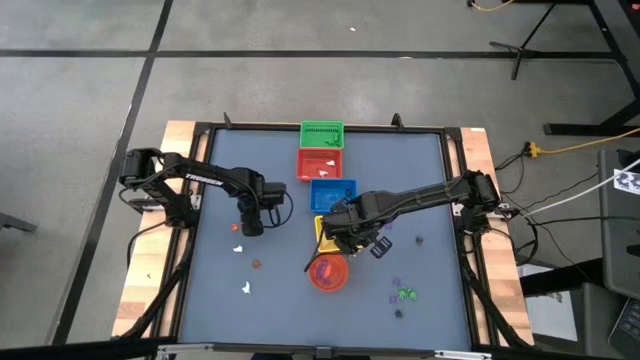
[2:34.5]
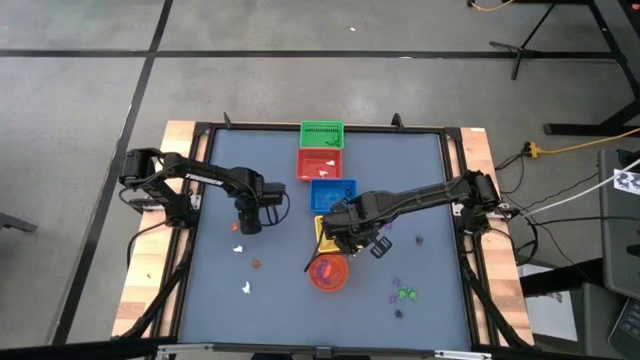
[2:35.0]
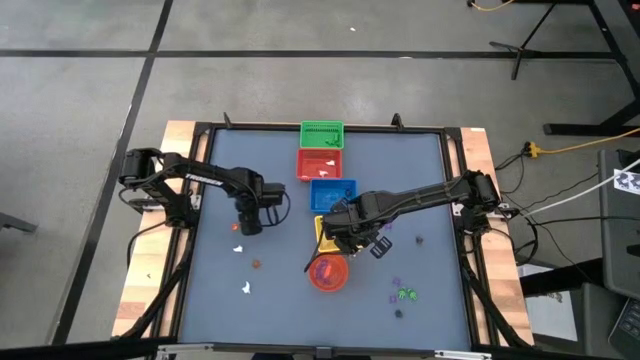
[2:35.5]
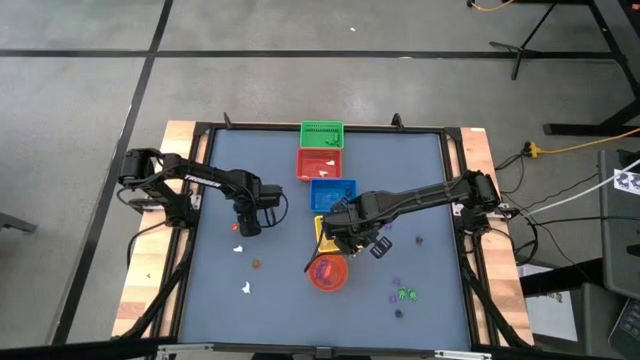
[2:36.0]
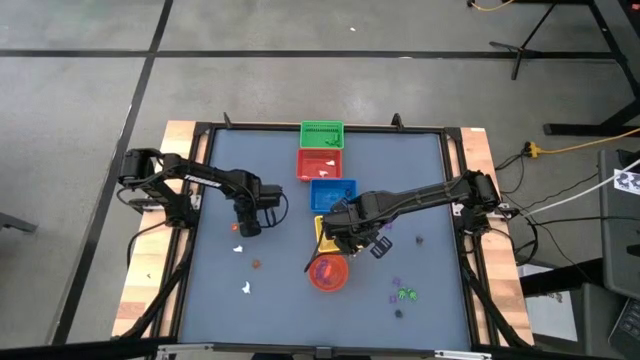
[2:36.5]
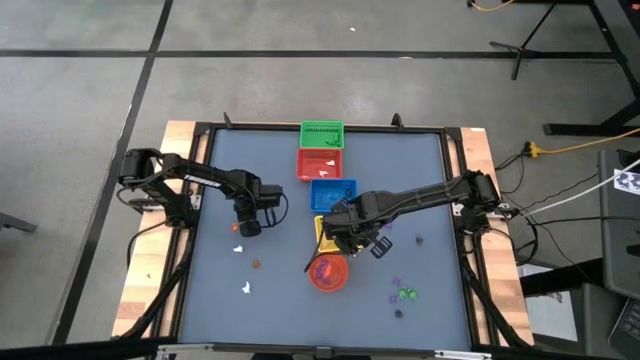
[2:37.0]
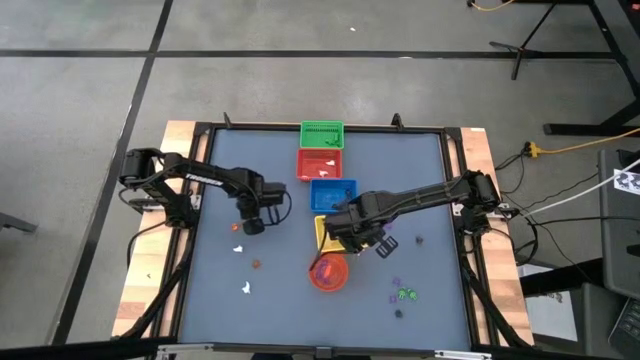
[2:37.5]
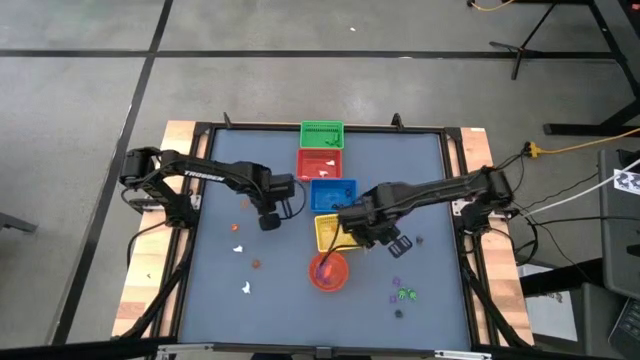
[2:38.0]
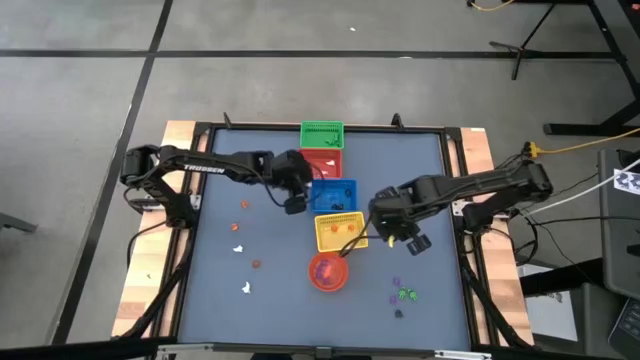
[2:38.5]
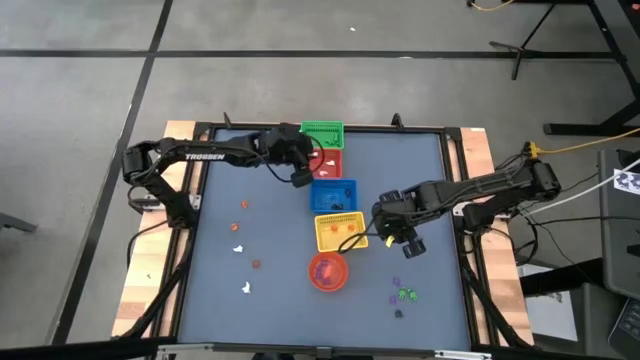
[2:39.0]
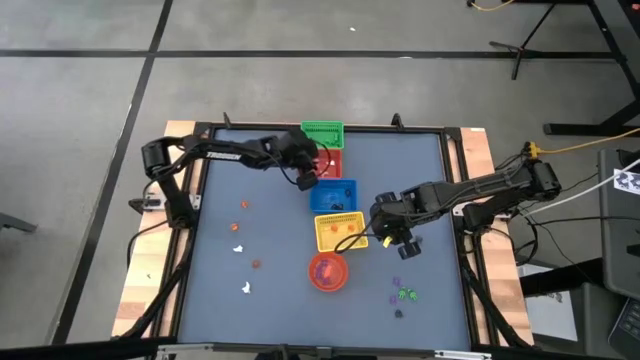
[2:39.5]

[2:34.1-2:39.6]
Task: Sort Halloween decoration
Put the white ghost toy into the red bin

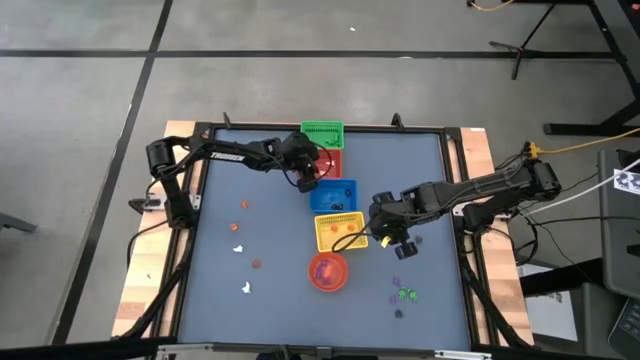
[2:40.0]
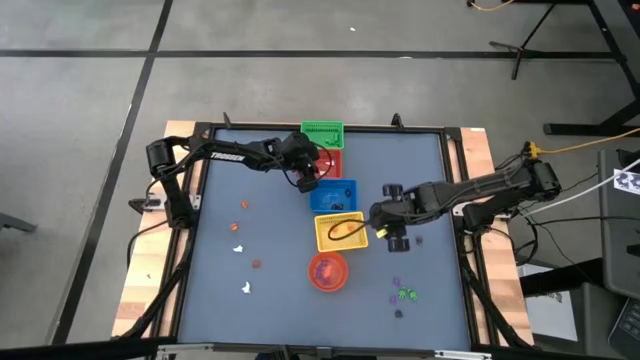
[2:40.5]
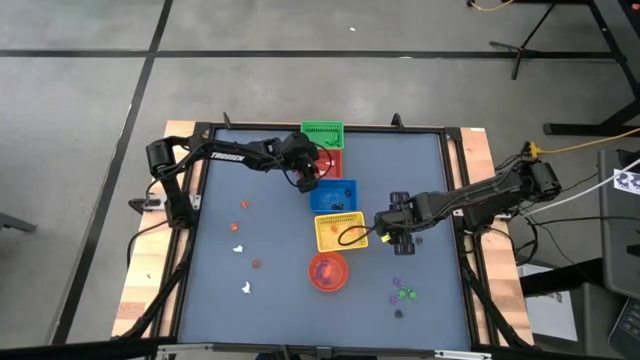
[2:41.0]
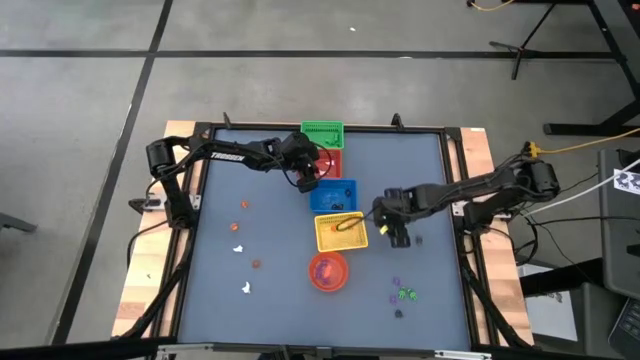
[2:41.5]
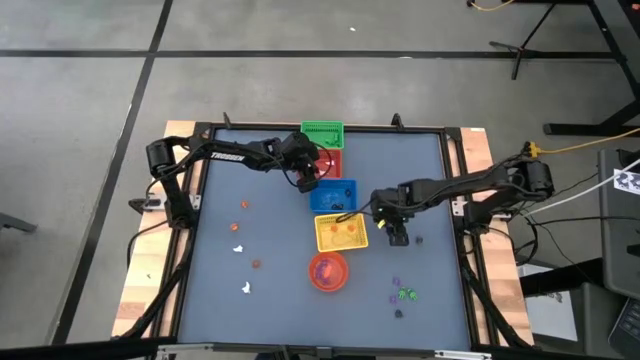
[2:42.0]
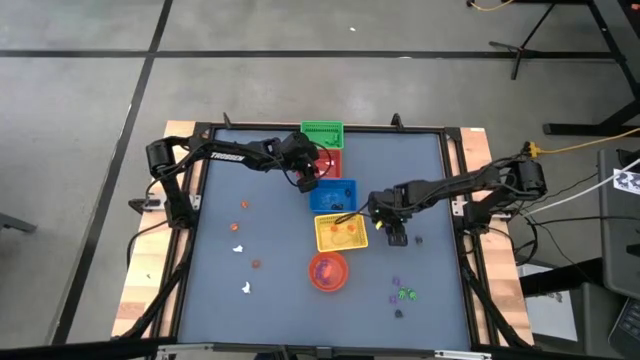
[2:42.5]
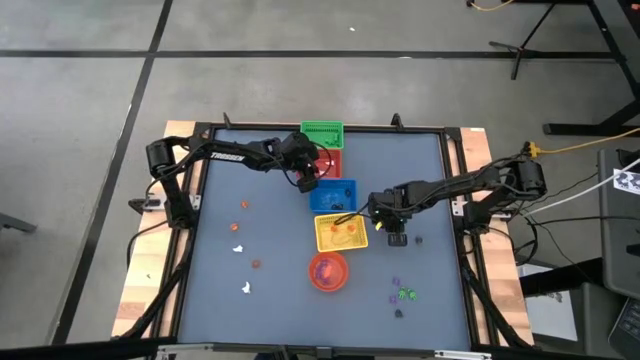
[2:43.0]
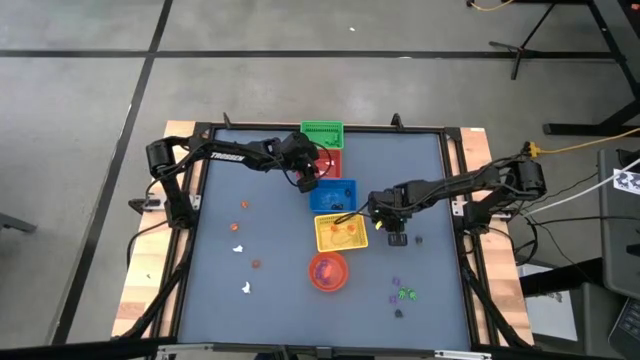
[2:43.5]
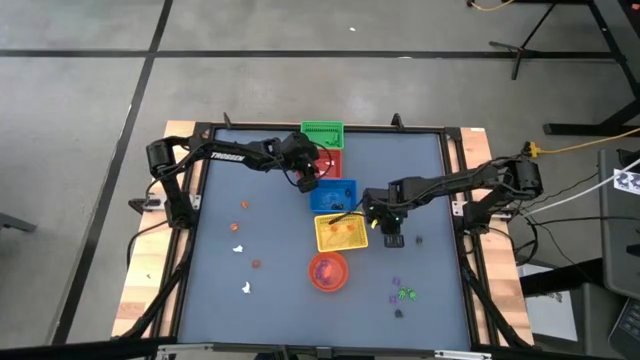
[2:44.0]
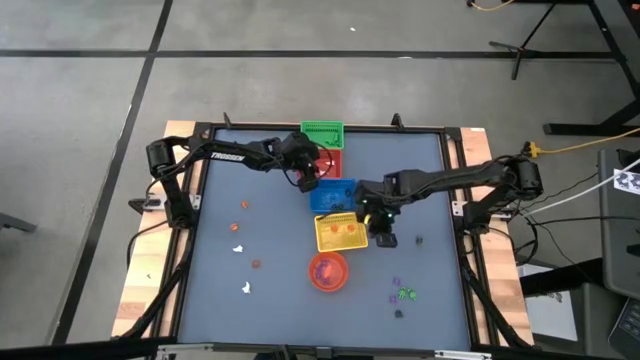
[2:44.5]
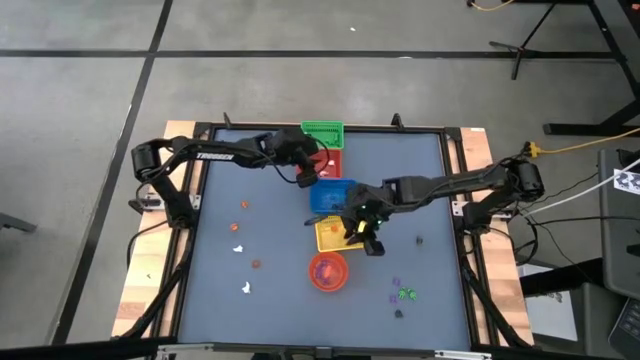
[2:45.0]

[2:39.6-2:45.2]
Put the purple spider toy into the orange bin

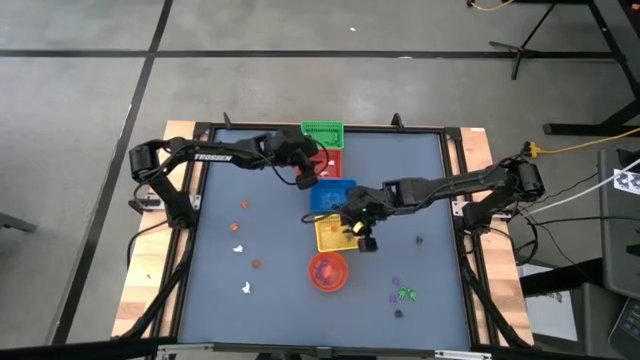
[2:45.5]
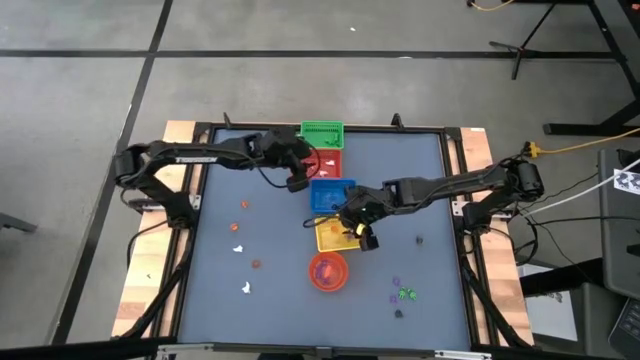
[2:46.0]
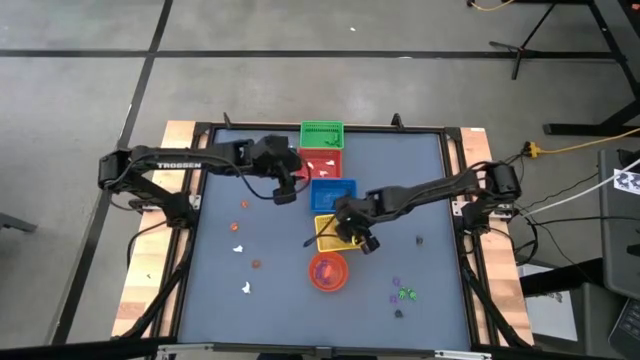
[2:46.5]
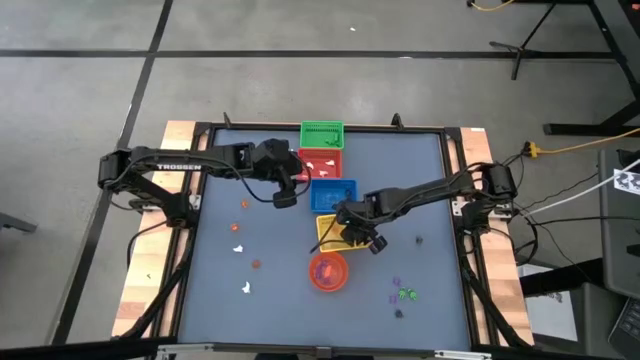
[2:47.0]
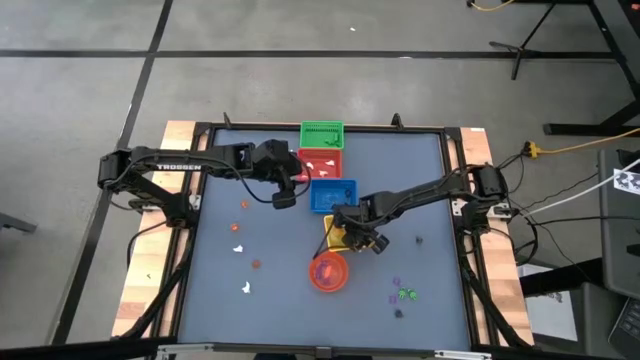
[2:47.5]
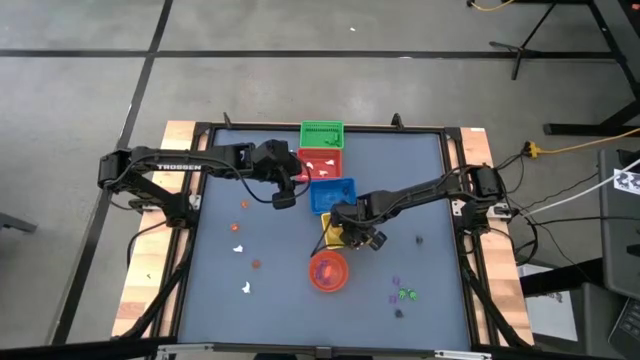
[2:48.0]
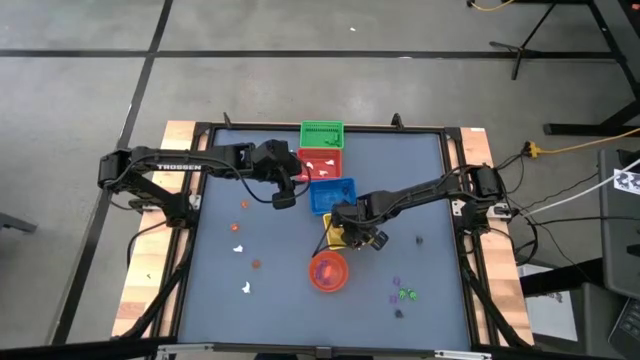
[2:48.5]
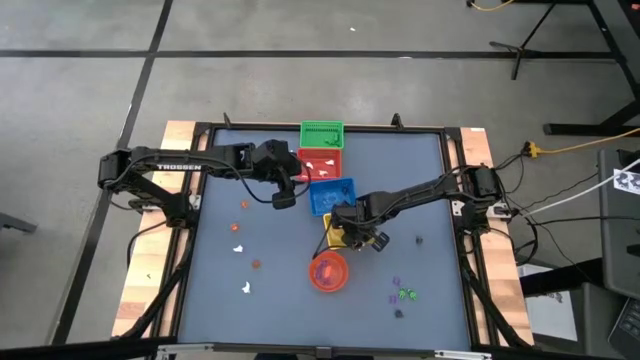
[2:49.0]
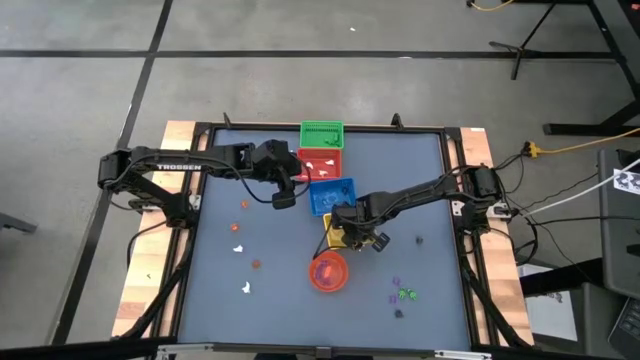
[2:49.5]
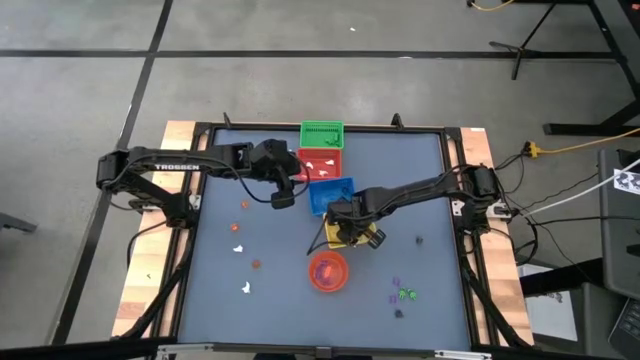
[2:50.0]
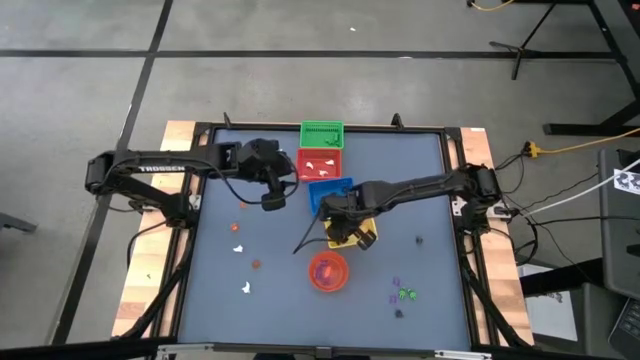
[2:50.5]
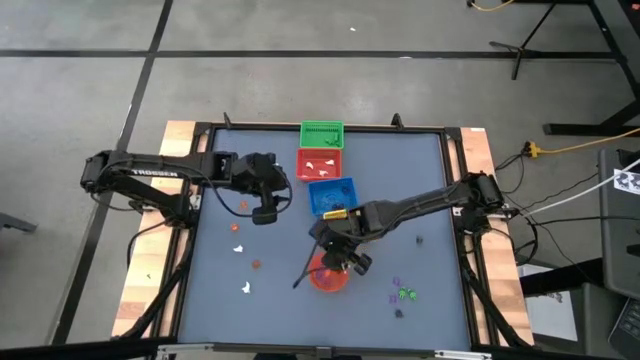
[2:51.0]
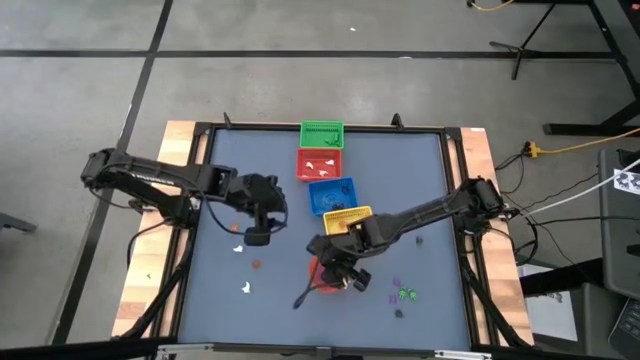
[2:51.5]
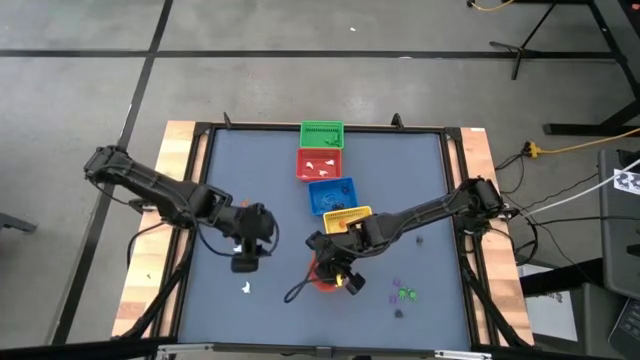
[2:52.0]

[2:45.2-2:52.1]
Put the purple spider toy into the orange bin

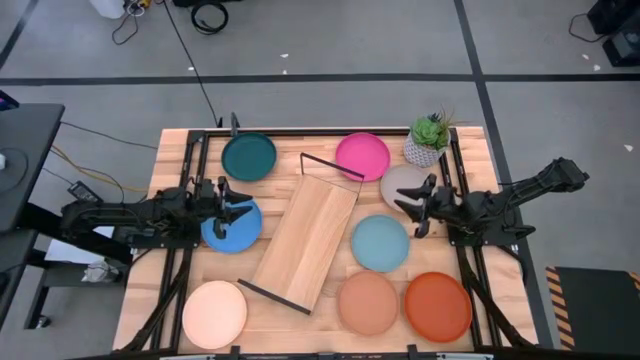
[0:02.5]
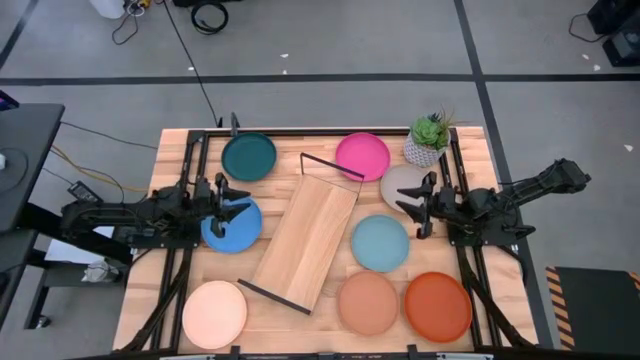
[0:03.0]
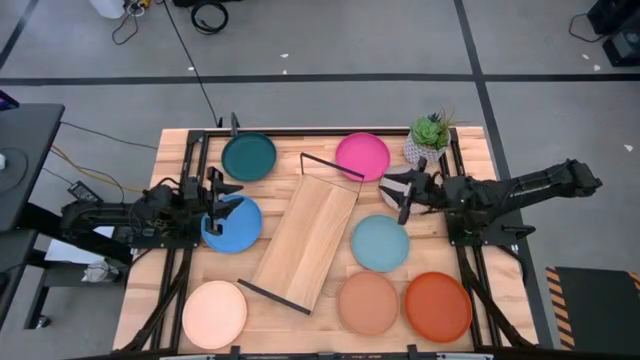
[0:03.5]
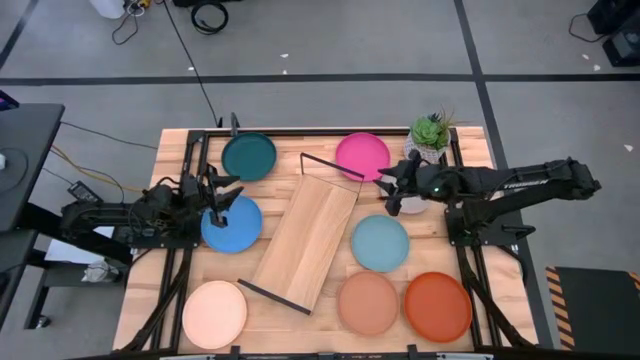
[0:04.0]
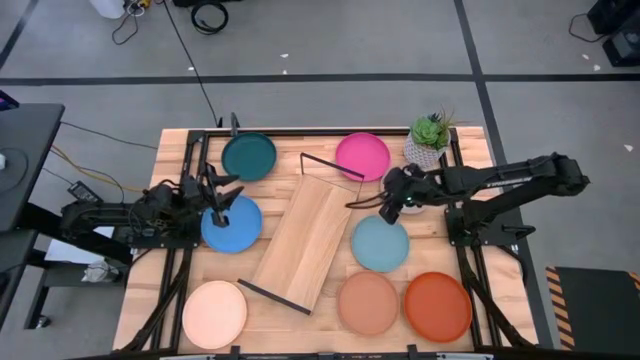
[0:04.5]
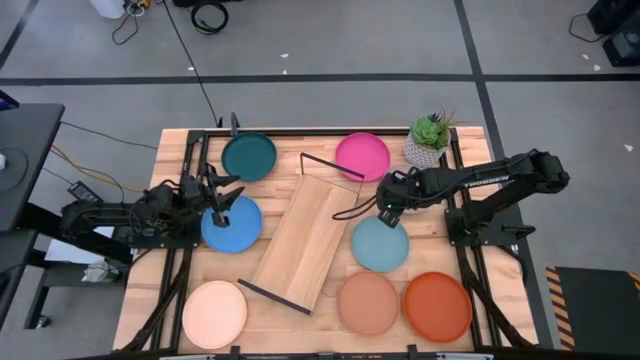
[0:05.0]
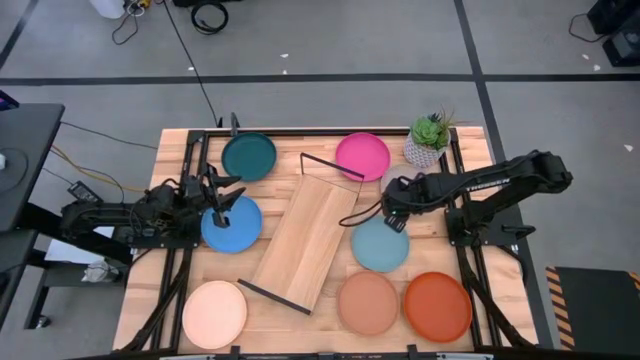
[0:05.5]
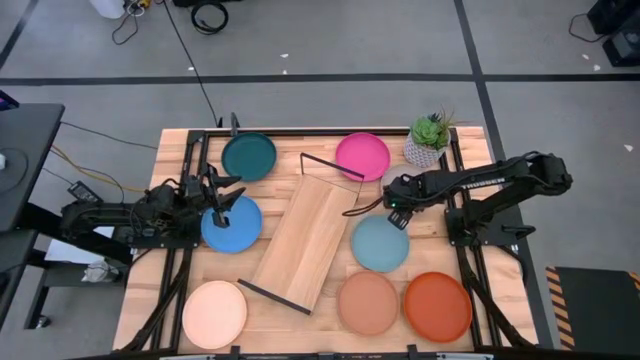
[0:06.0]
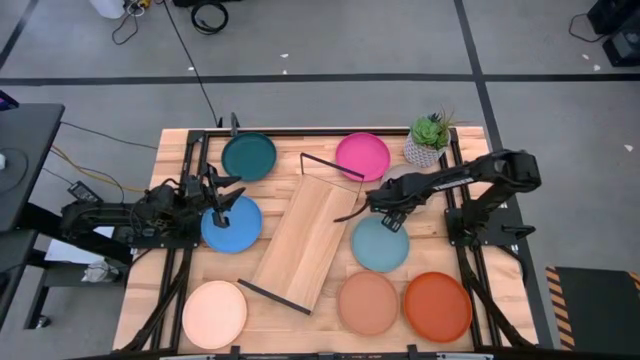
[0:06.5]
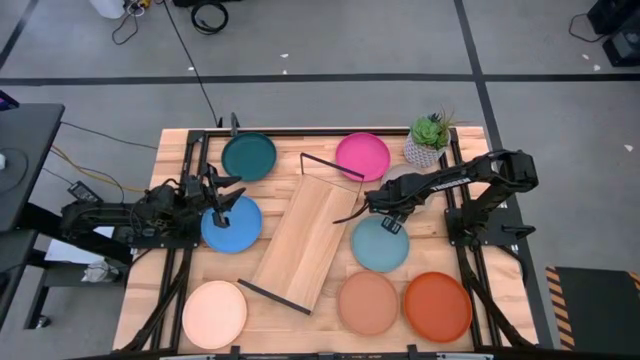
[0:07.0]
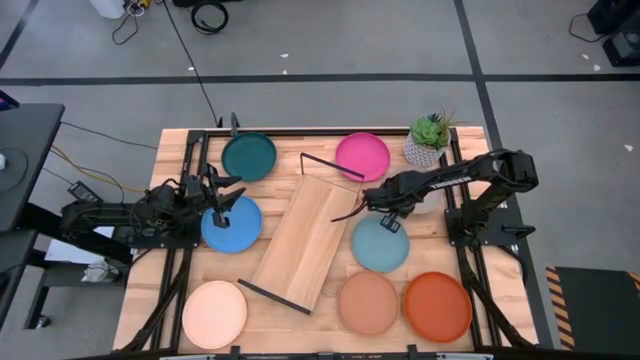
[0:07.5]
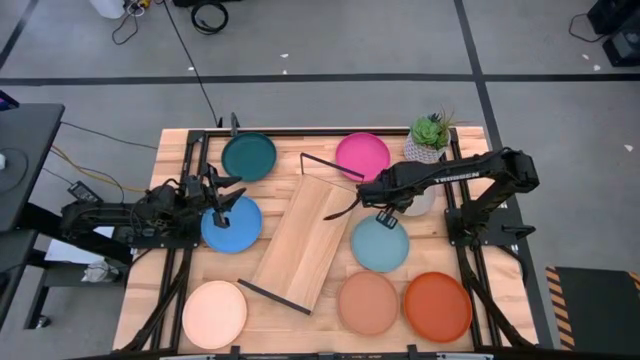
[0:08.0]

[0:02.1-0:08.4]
Task: Place and stack plates onto a shelf
Put the gray plate on the shelf
